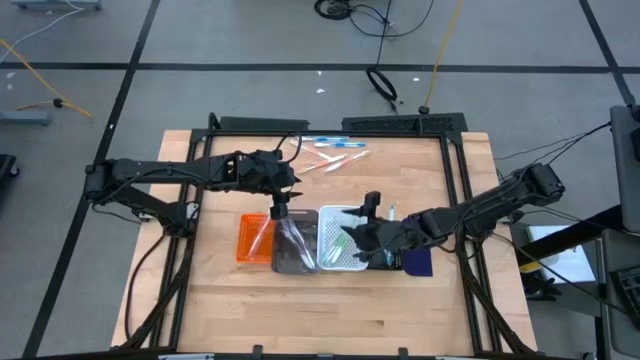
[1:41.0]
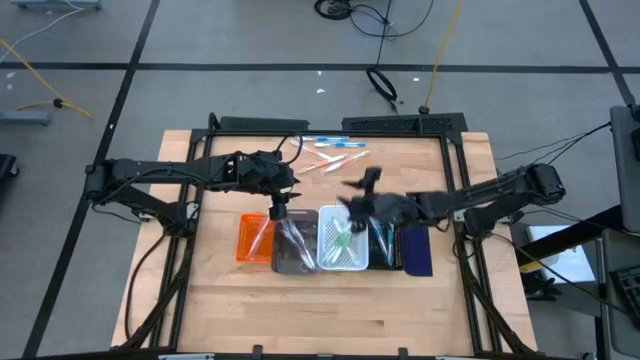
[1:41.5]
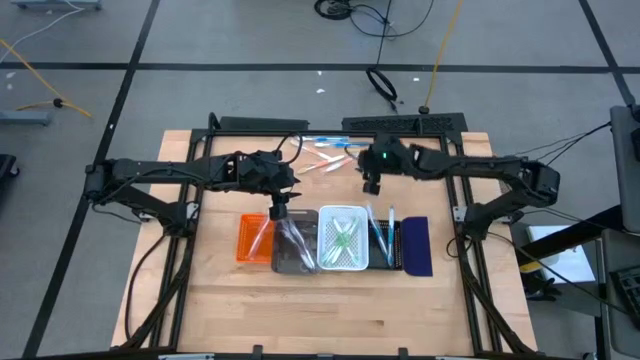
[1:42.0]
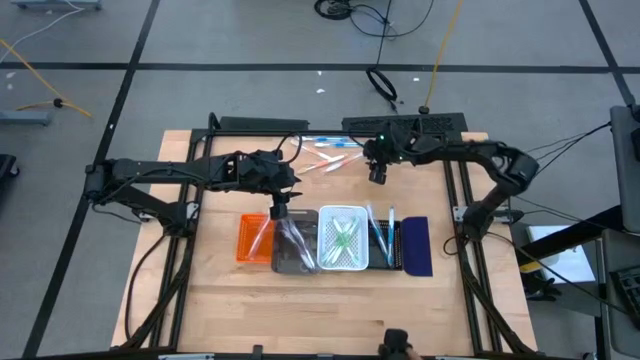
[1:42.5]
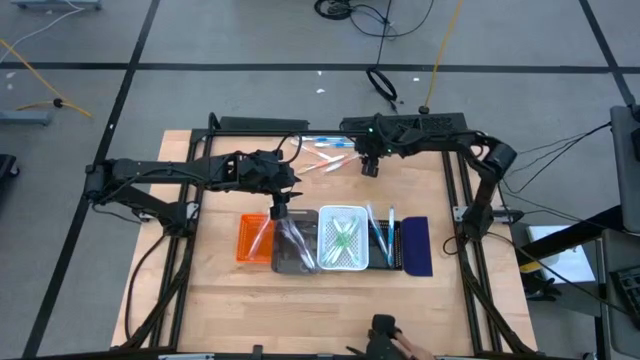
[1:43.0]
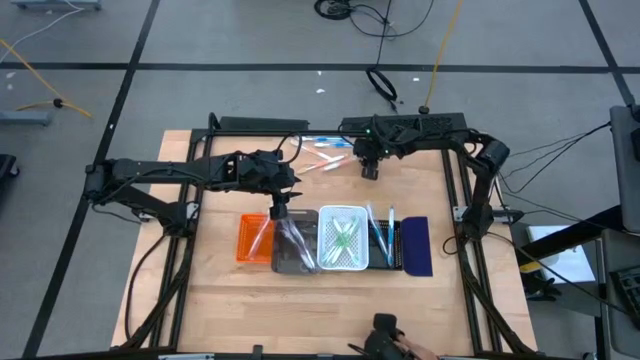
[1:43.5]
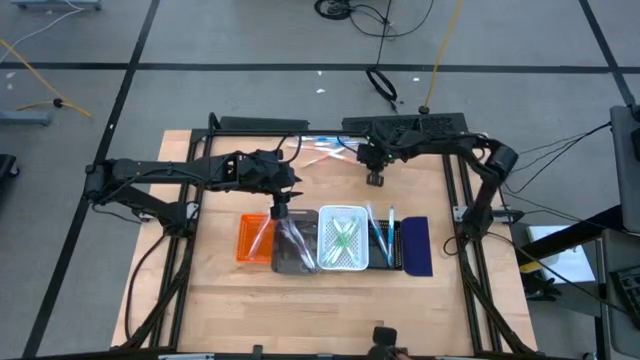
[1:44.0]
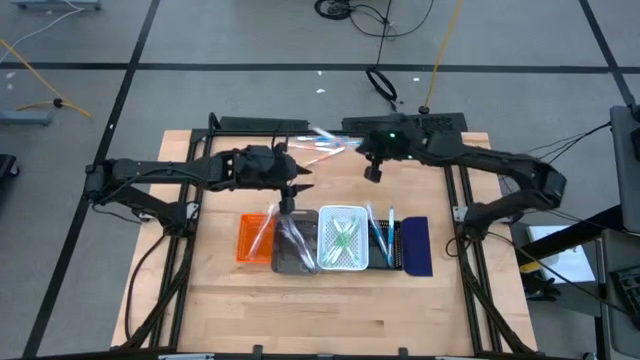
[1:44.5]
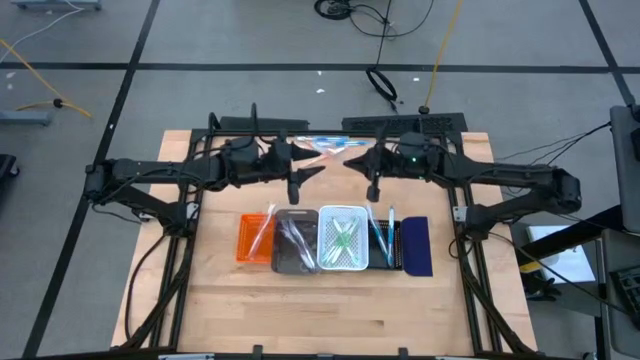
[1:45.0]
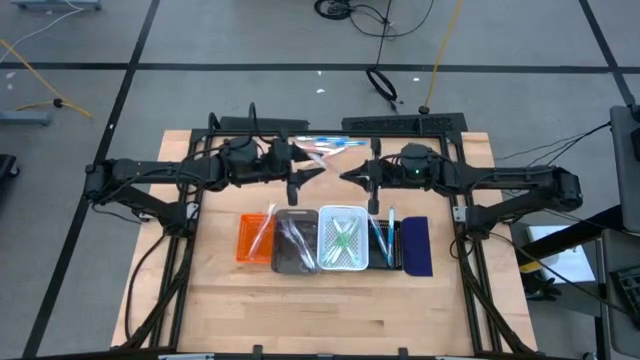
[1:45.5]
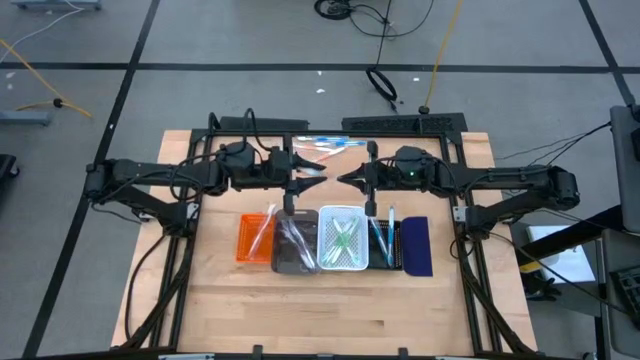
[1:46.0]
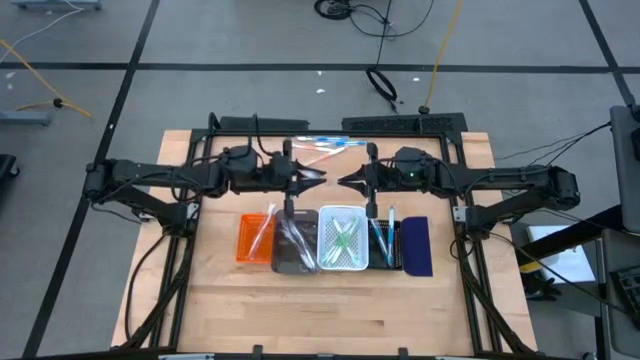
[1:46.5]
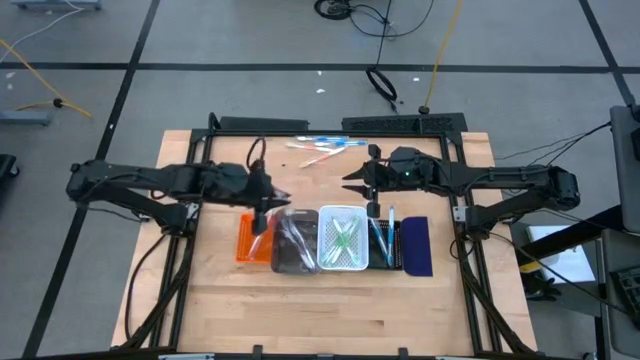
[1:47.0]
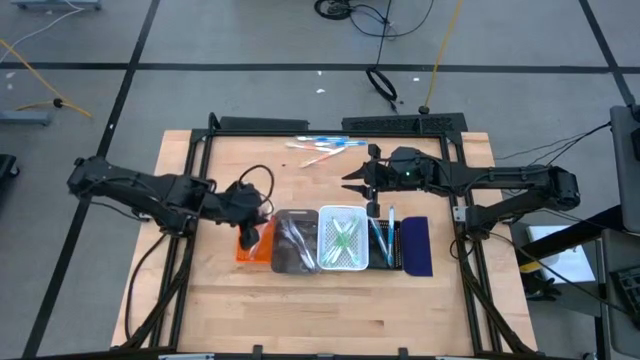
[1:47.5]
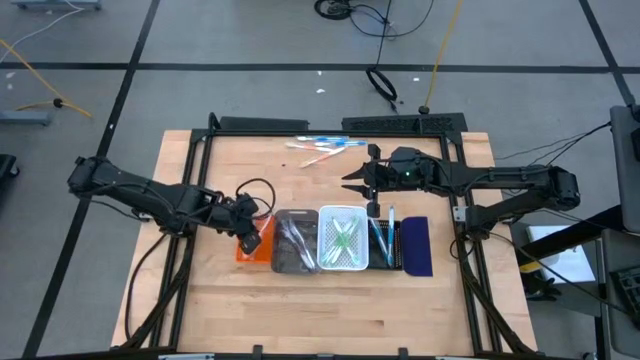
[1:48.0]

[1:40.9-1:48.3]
Task: Pick & Place Toothbrushes
Put the orange toothbrush into the orange bin

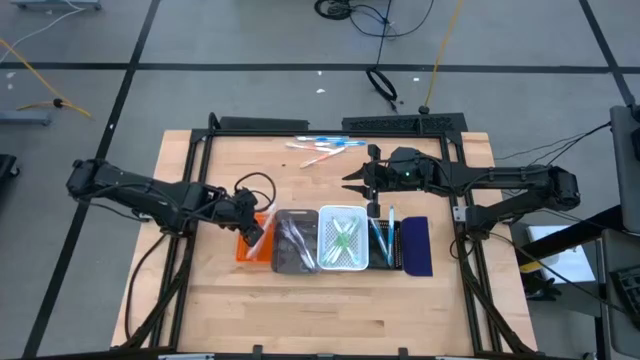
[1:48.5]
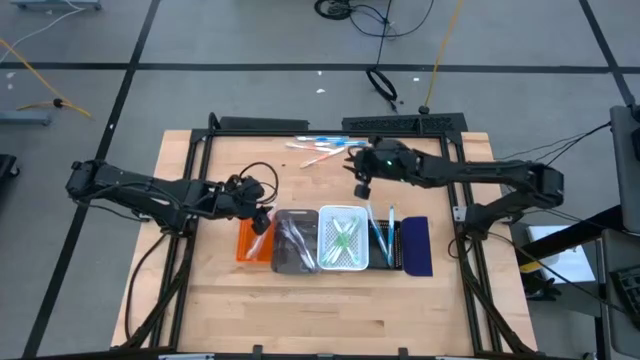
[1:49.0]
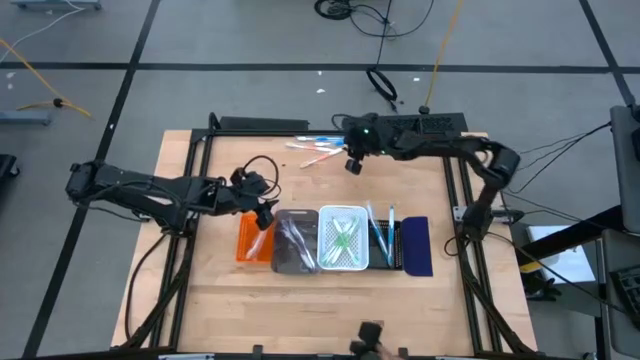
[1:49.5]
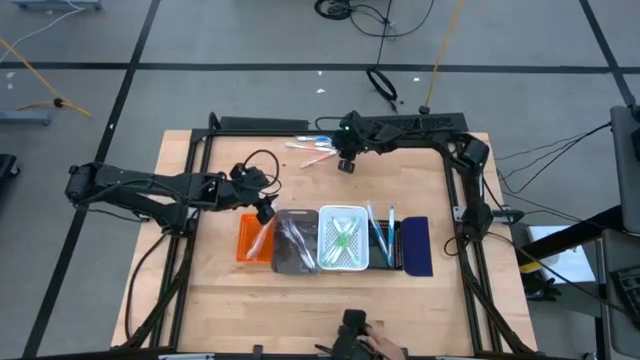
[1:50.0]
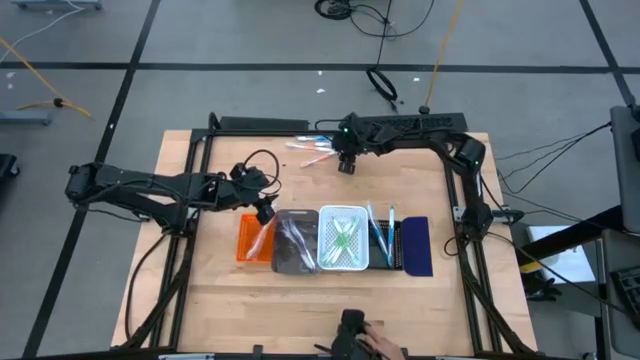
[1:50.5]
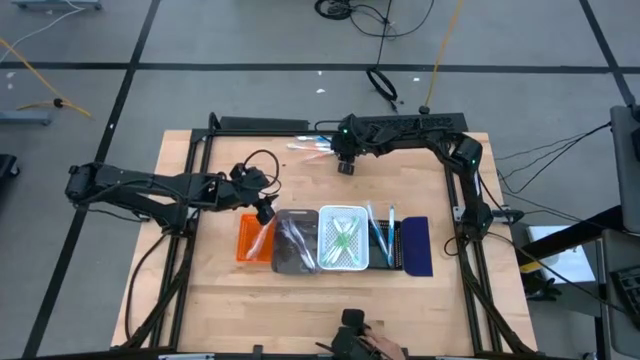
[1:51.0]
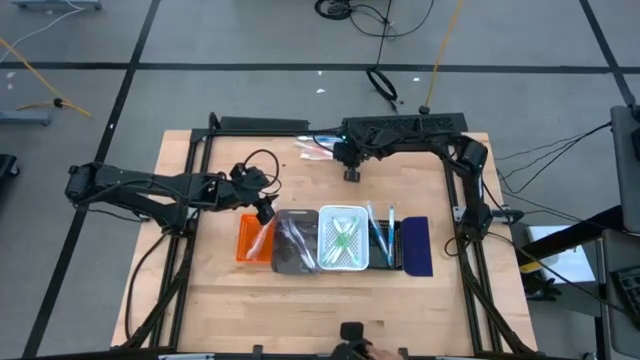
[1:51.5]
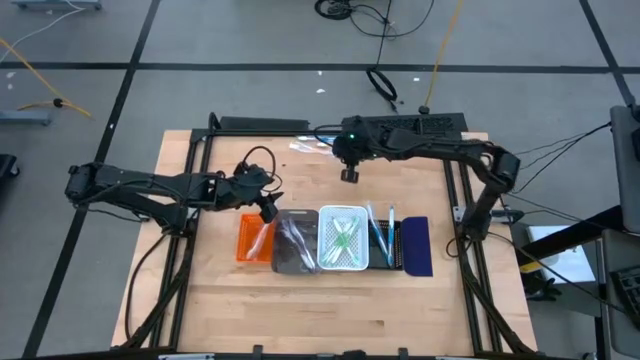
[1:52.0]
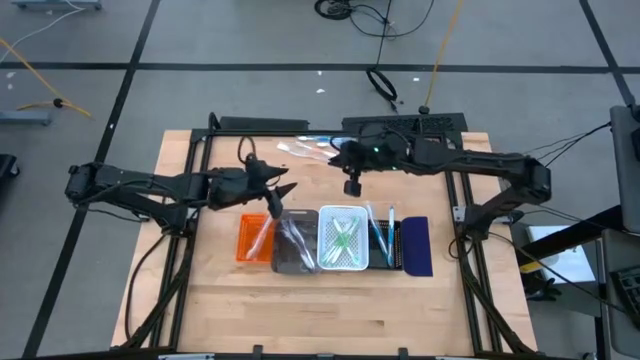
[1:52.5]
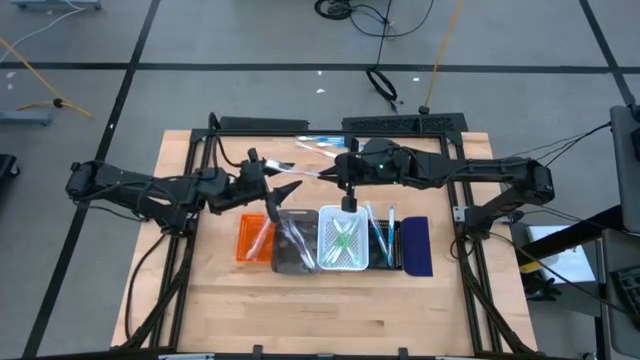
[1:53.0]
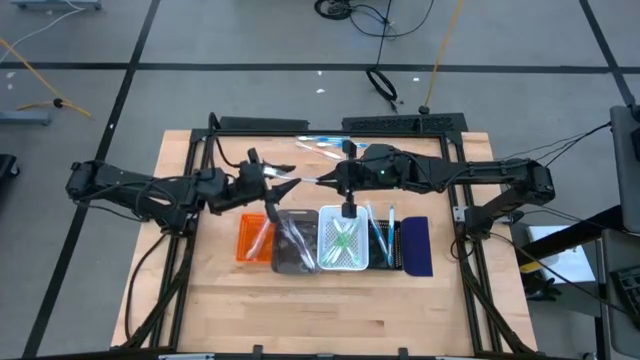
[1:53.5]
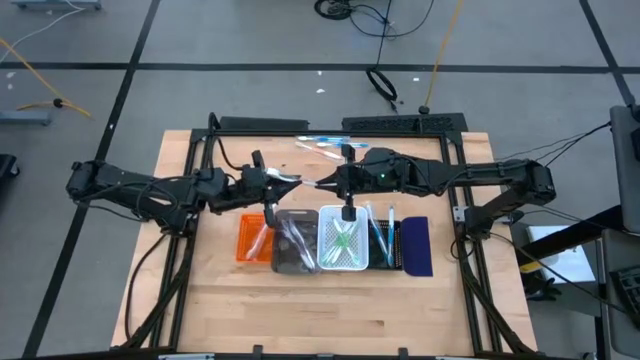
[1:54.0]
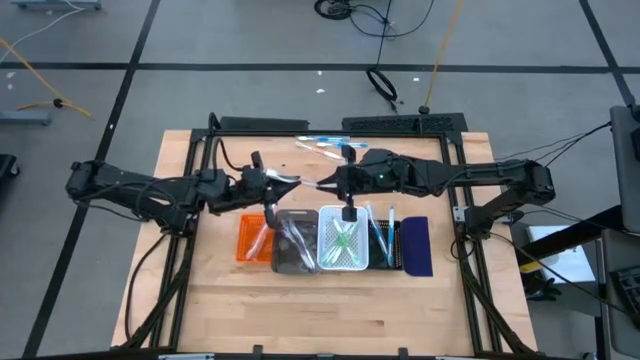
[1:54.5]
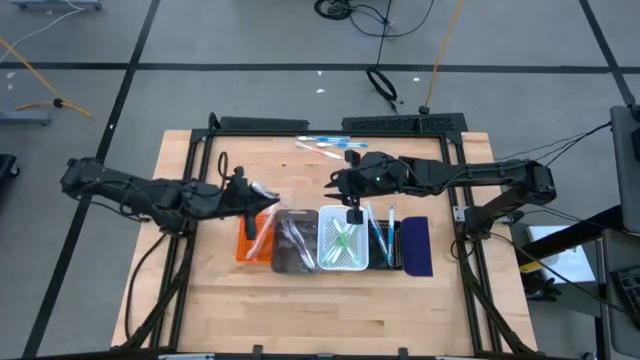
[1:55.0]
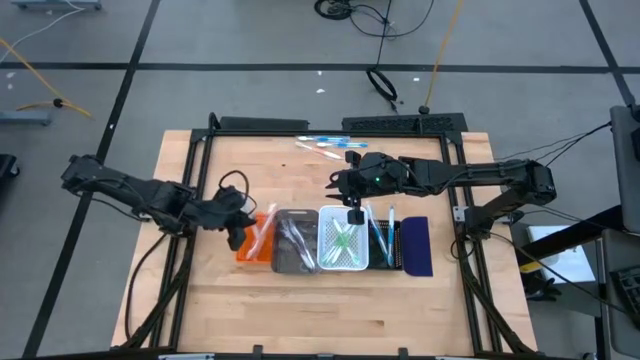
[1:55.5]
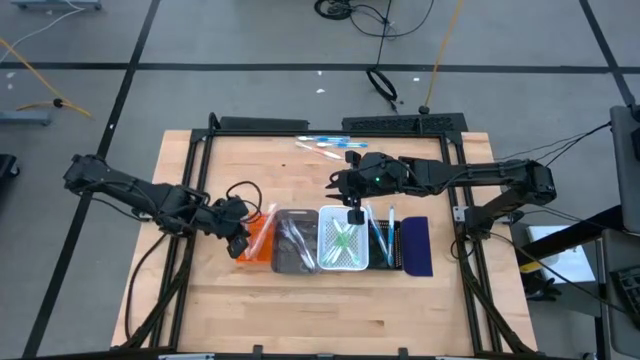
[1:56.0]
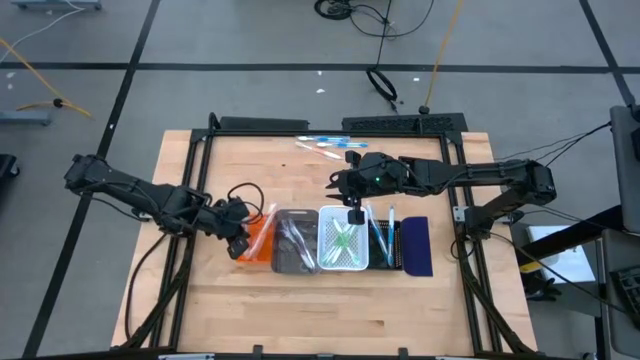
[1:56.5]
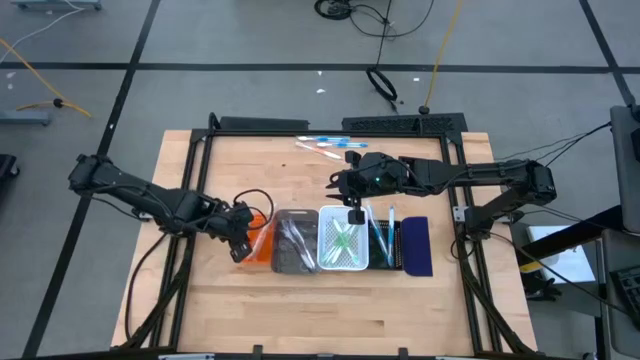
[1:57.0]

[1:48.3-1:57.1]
Put the orange toothbrush into the orange bin

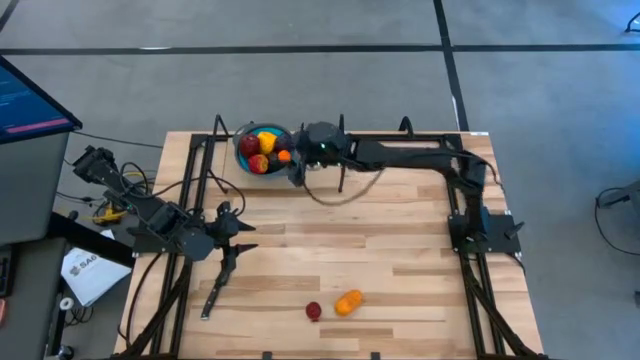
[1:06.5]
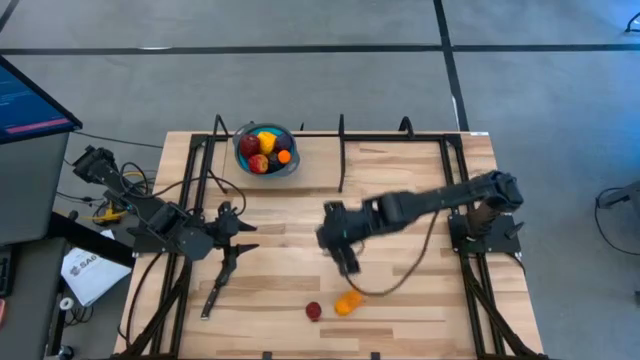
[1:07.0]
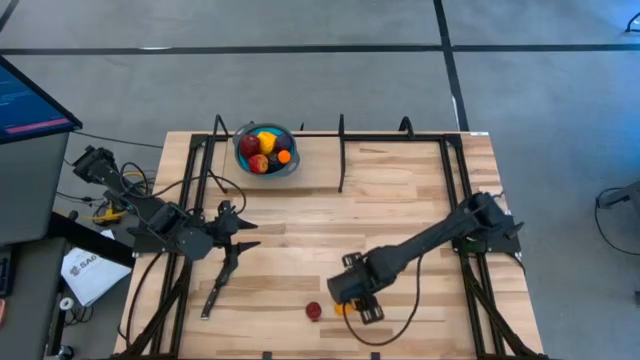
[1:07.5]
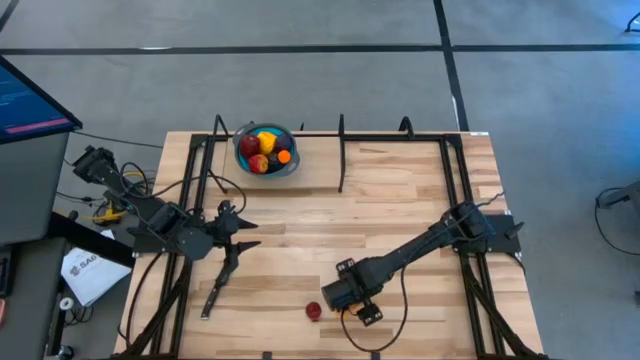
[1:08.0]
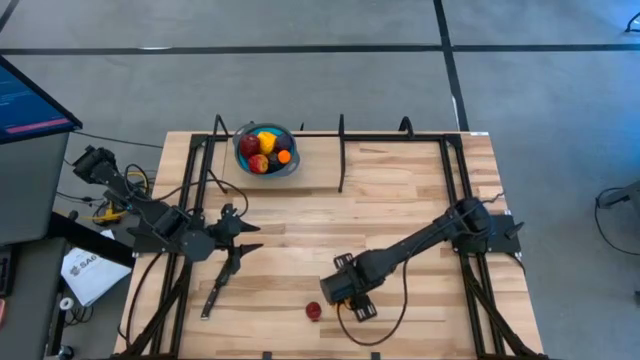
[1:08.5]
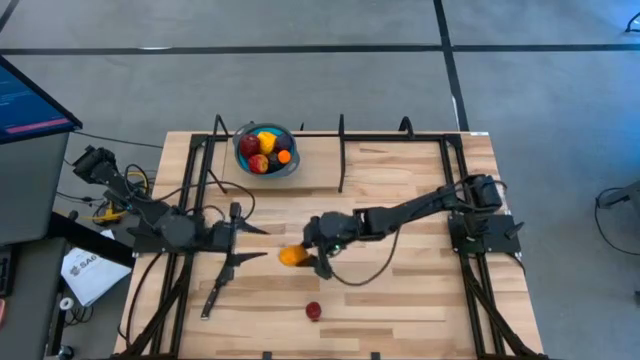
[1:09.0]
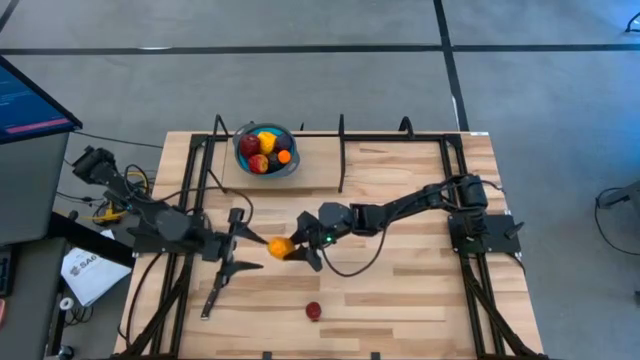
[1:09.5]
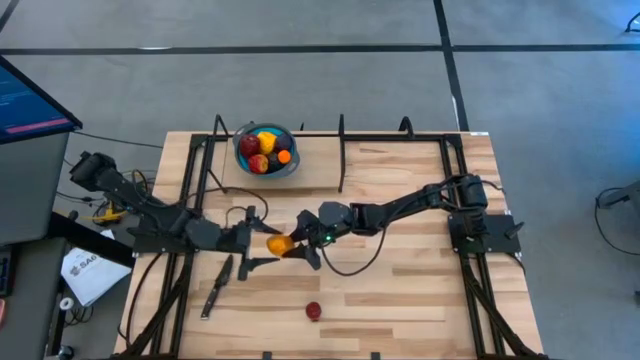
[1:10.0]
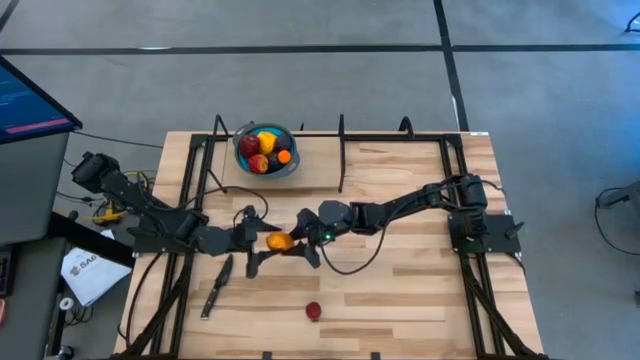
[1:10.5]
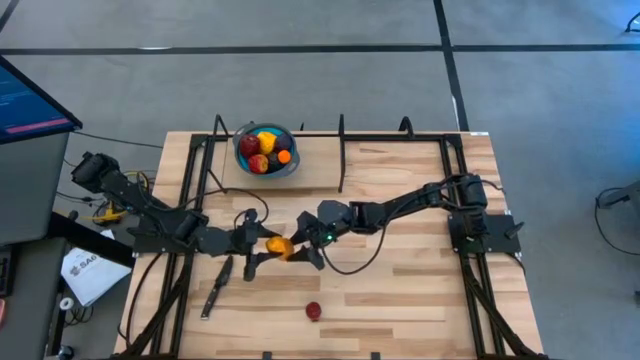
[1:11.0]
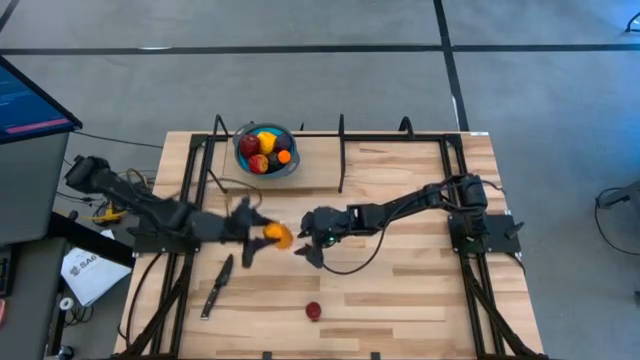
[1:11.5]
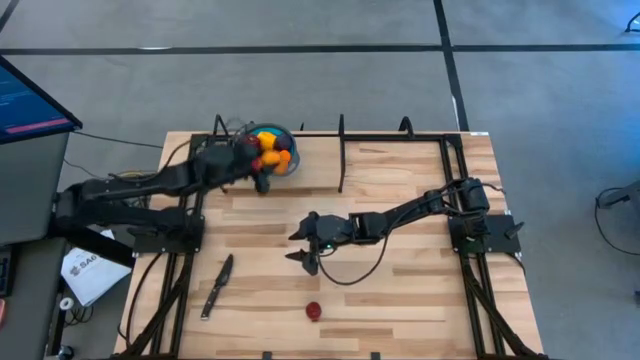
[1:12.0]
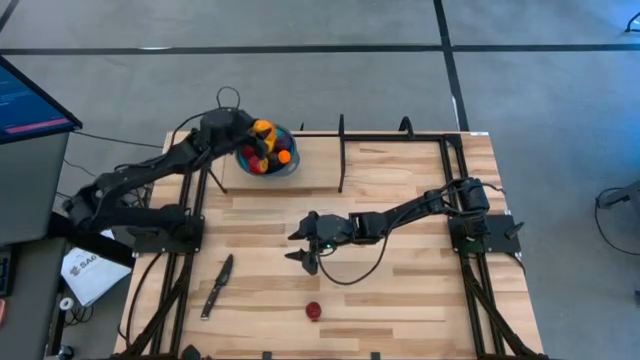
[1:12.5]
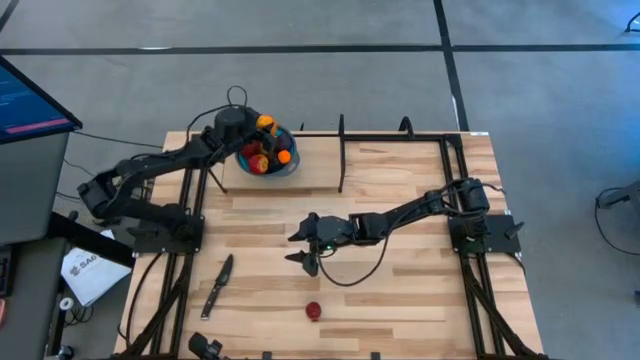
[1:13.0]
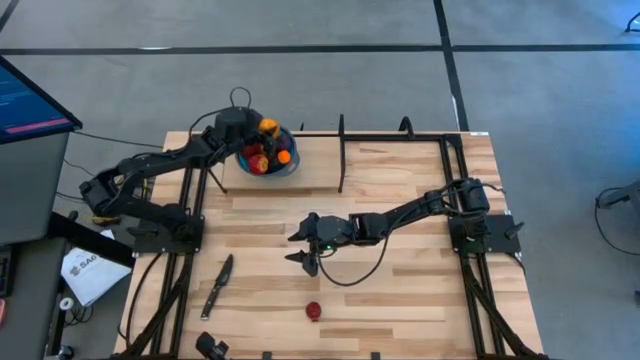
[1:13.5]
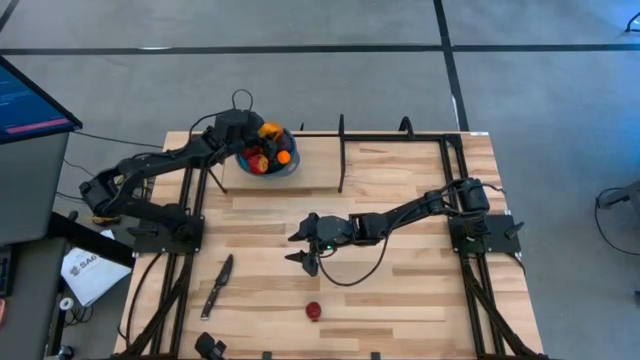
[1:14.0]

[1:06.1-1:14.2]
Task: Pick & Place Fruit
Put the yellow mango in the blue strainer bowl on the shelf
